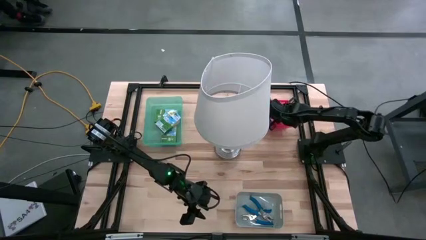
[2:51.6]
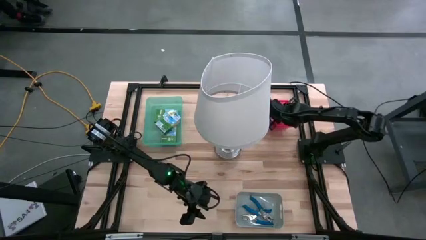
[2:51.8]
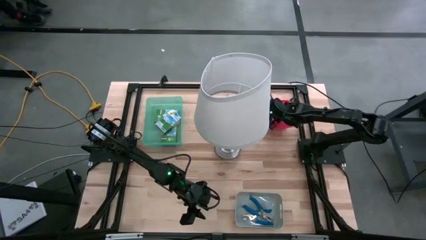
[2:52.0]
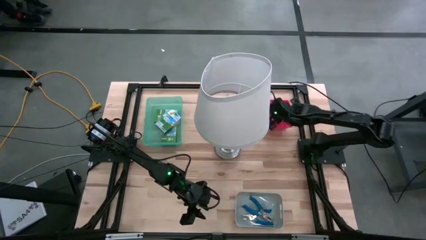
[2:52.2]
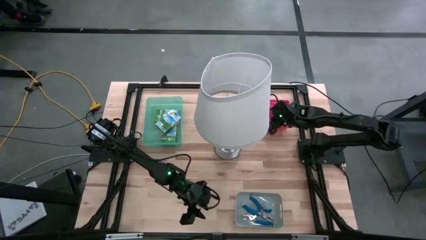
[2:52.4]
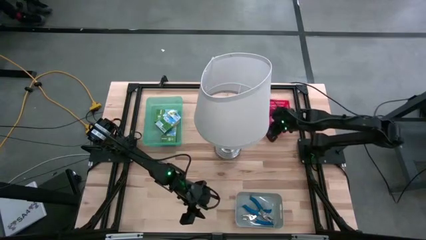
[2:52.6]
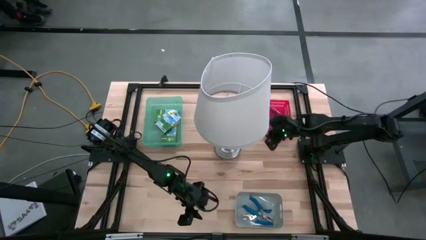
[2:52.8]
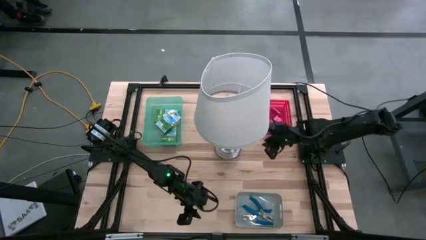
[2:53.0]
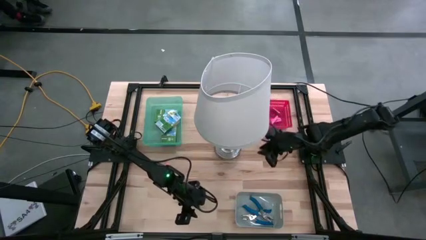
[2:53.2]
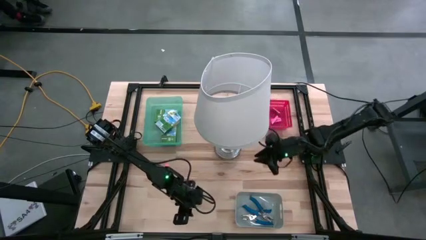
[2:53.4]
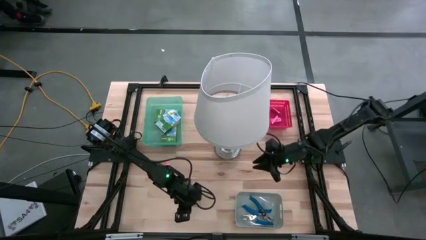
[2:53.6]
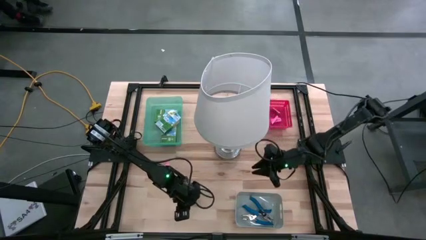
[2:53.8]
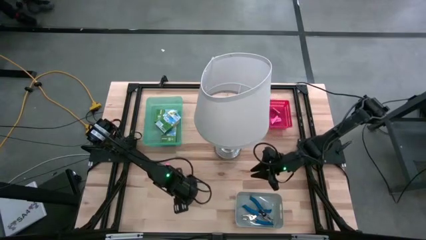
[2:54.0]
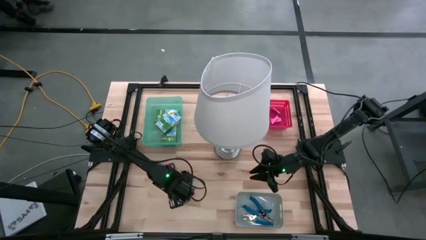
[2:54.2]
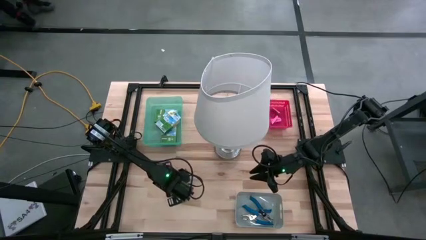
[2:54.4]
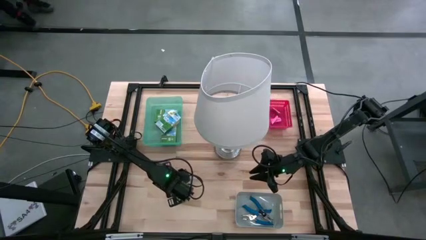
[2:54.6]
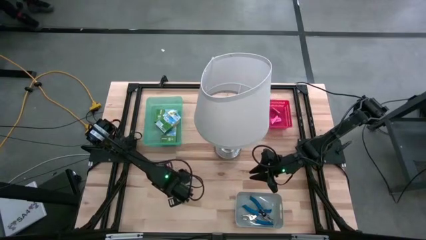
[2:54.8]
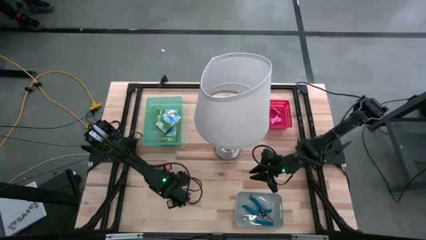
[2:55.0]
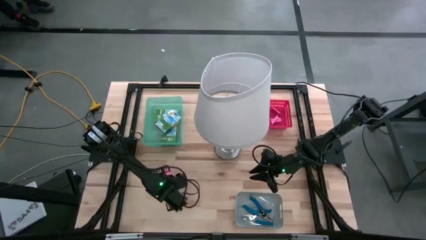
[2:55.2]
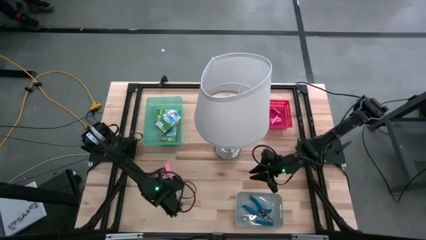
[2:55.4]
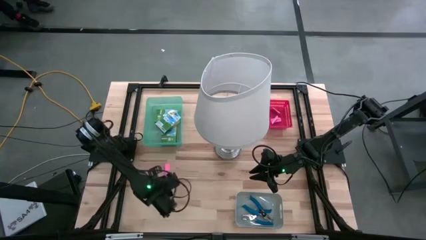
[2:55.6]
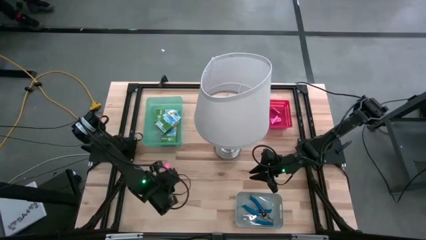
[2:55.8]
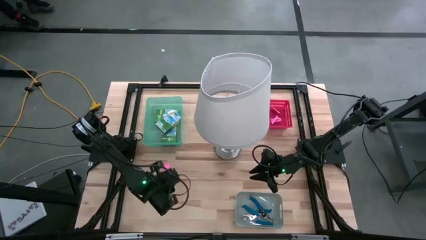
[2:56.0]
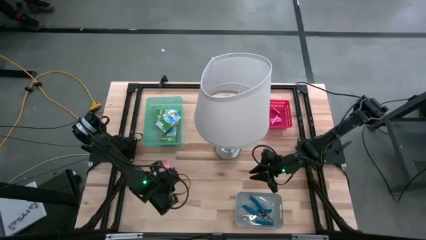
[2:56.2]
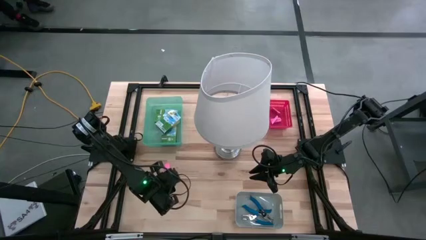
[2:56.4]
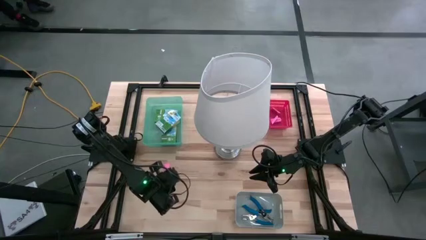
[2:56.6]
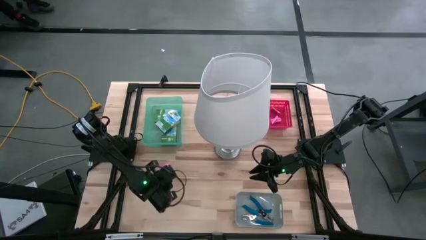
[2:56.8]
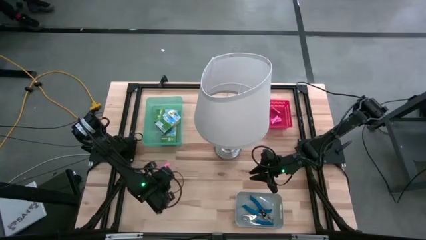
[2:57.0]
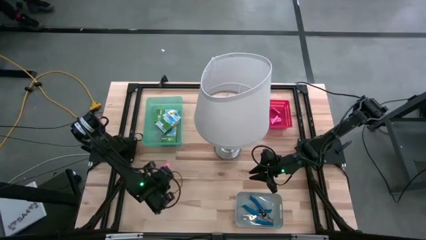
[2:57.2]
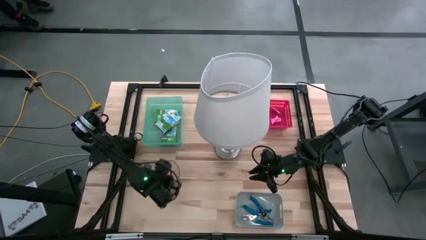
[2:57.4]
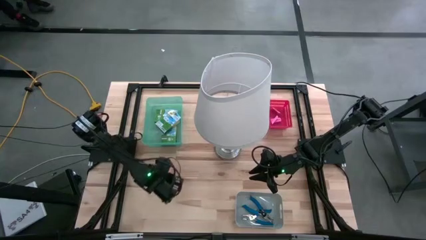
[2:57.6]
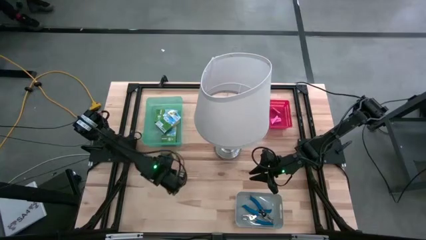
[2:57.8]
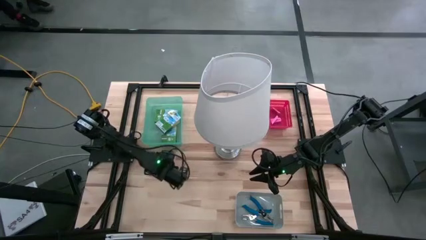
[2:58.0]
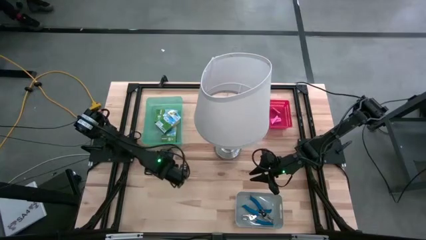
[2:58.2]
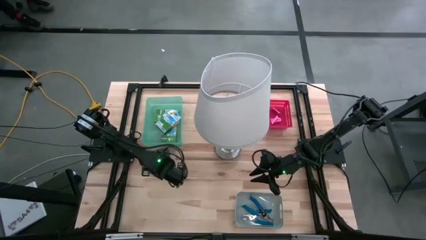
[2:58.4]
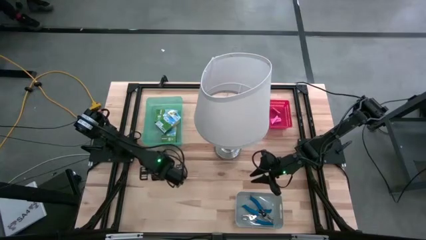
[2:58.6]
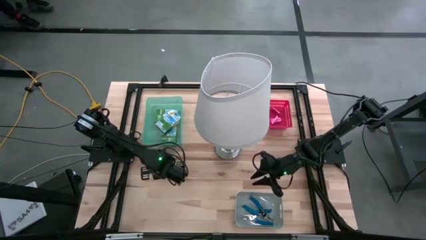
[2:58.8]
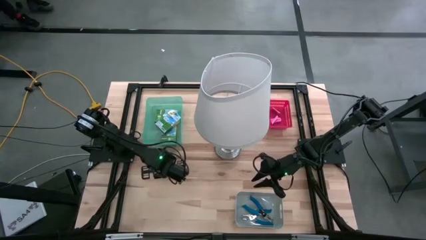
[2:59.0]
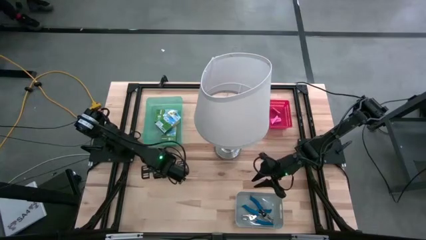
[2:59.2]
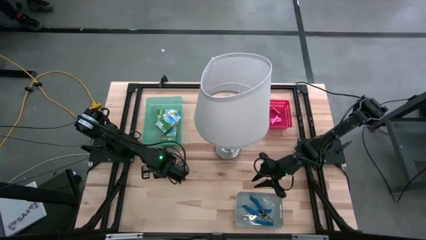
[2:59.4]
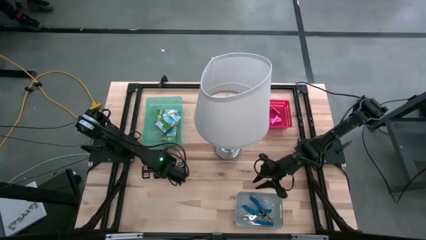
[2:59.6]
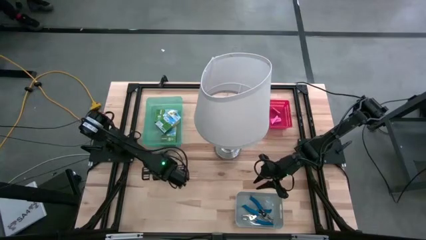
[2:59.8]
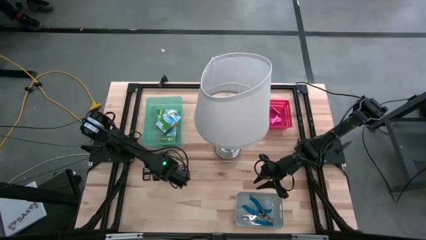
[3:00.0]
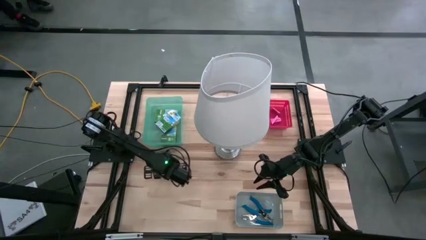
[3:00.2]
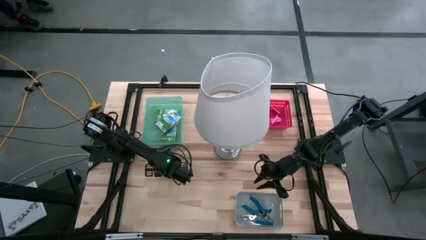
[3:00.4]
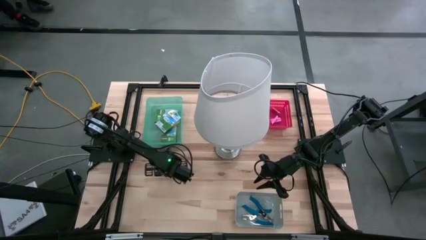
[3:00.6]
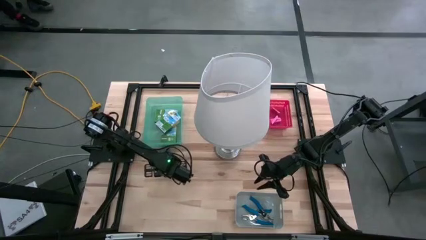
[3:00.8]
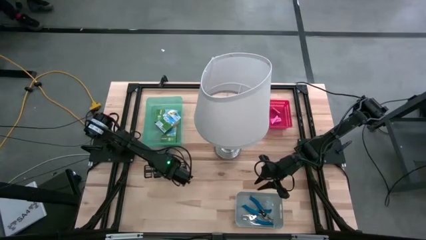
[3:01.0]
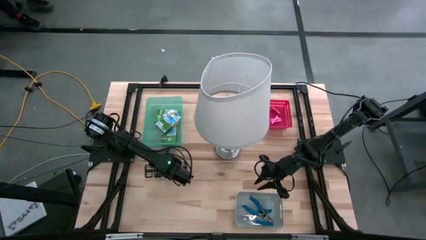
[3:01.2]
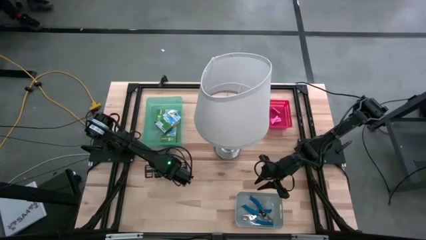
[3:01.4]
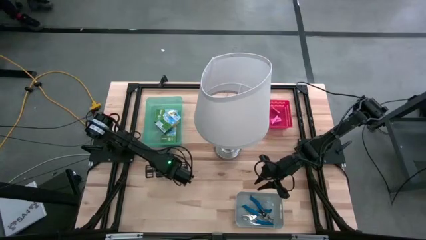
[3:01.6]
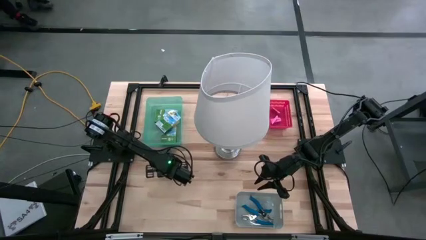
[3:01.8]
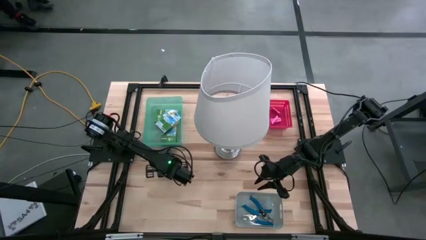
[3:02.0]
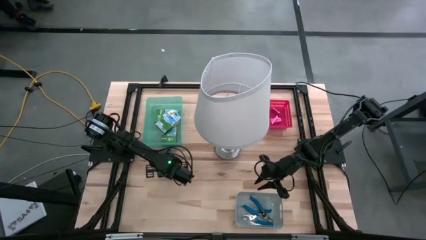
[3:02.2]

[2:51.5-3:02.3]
Task: Pick & Place School Supplies
Put the pink eraser into the red bin

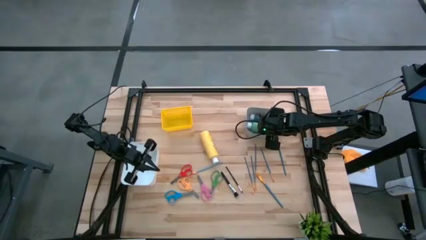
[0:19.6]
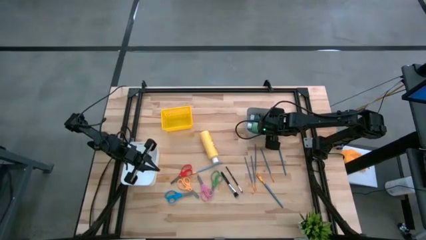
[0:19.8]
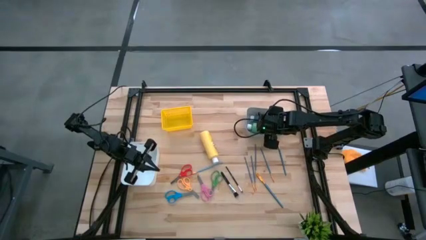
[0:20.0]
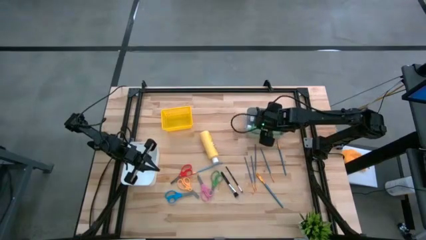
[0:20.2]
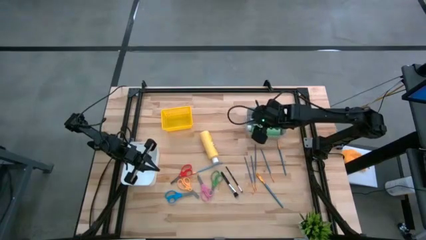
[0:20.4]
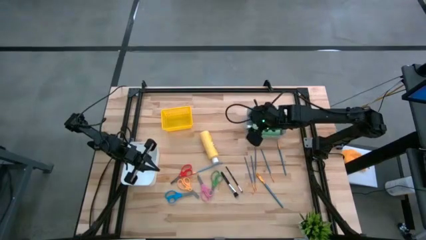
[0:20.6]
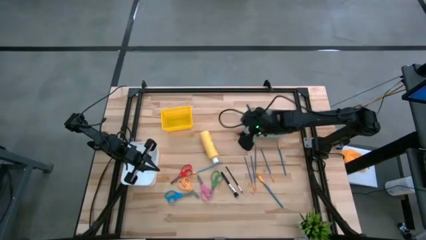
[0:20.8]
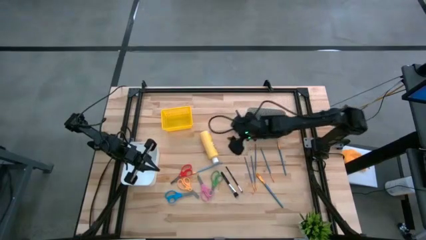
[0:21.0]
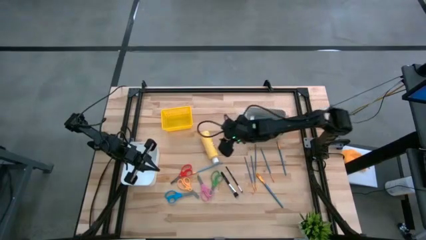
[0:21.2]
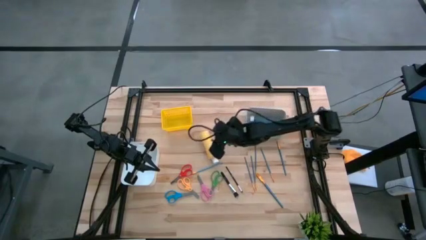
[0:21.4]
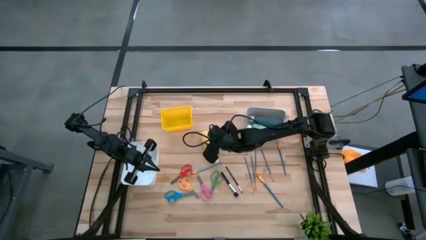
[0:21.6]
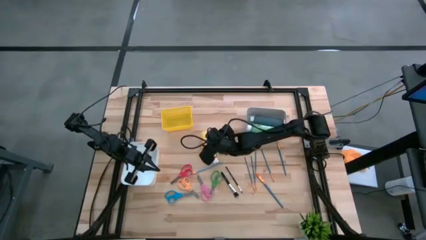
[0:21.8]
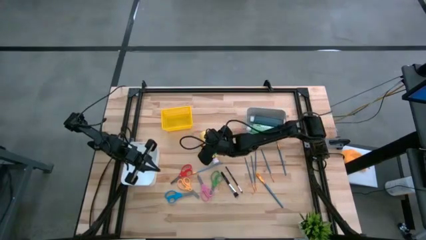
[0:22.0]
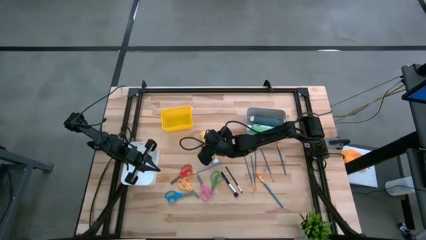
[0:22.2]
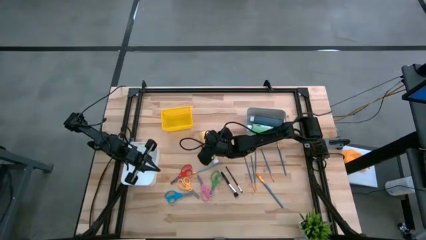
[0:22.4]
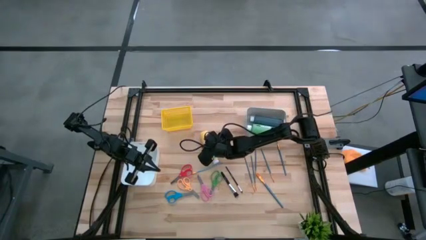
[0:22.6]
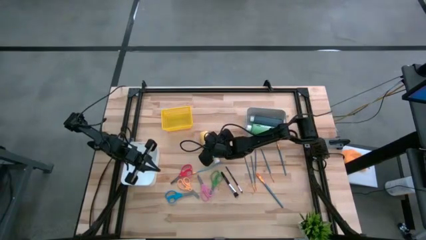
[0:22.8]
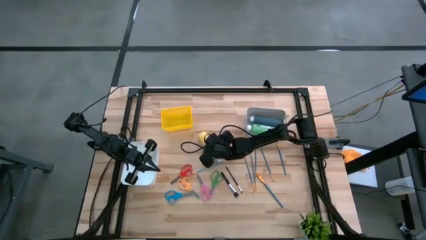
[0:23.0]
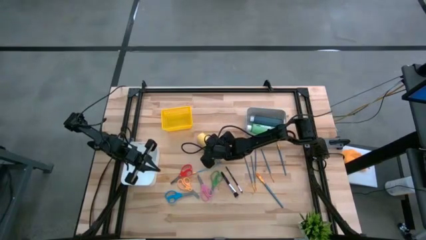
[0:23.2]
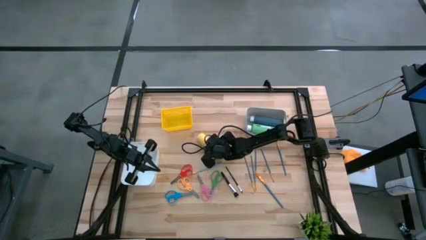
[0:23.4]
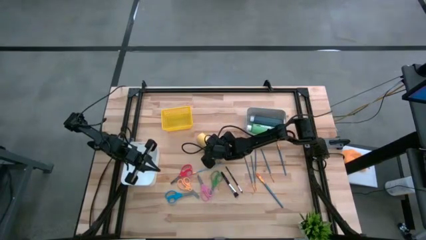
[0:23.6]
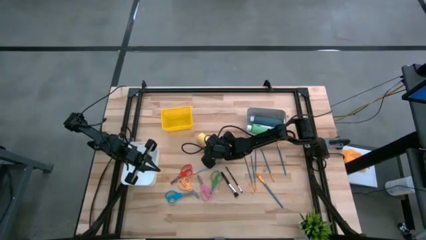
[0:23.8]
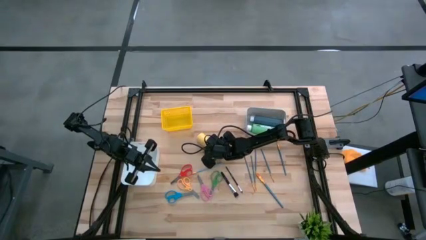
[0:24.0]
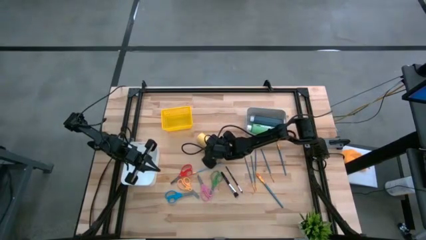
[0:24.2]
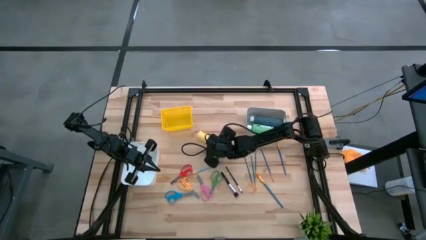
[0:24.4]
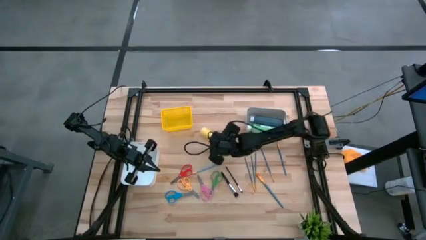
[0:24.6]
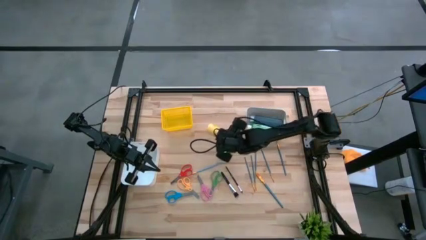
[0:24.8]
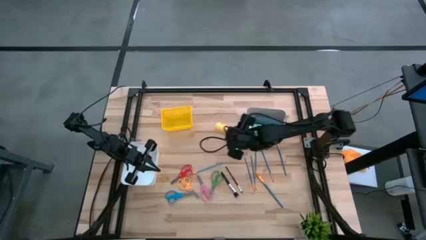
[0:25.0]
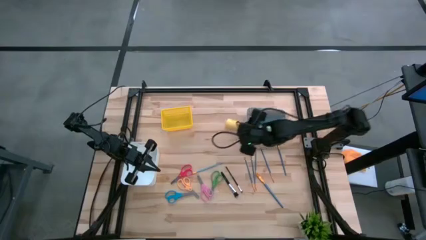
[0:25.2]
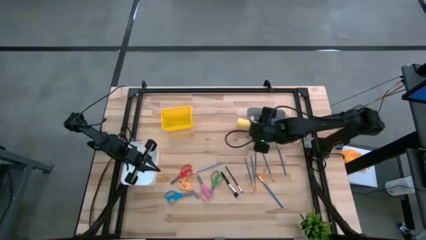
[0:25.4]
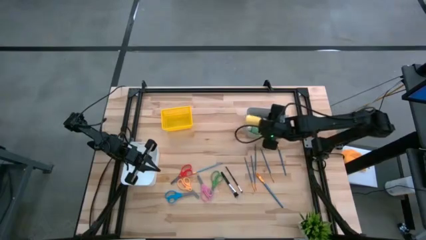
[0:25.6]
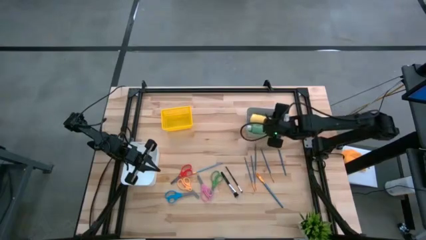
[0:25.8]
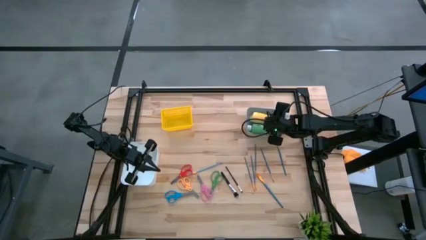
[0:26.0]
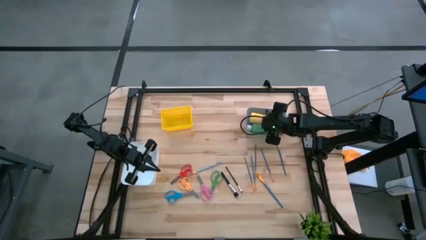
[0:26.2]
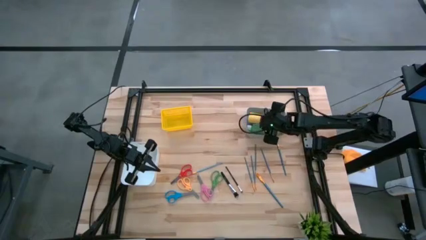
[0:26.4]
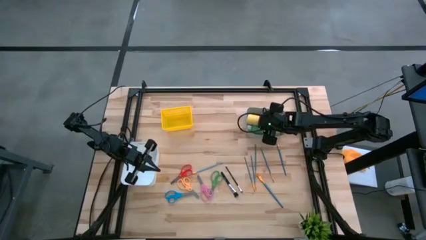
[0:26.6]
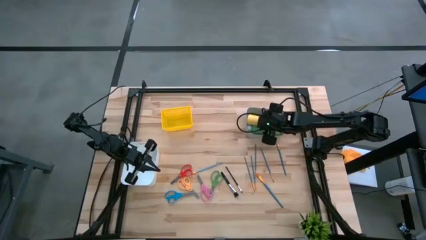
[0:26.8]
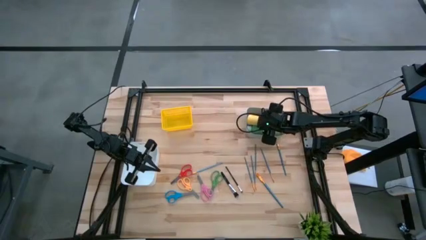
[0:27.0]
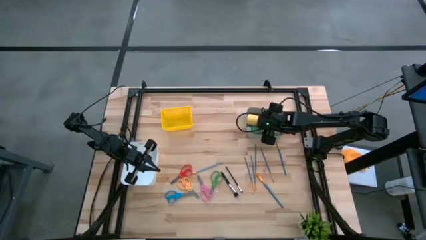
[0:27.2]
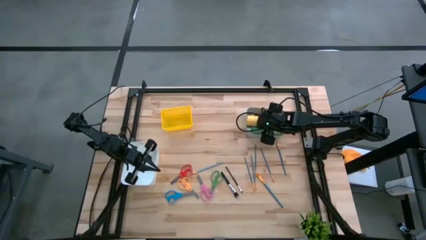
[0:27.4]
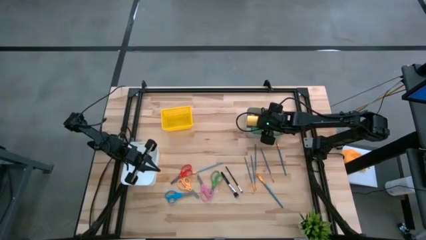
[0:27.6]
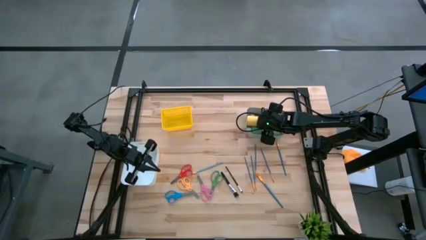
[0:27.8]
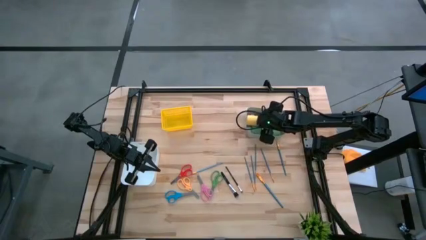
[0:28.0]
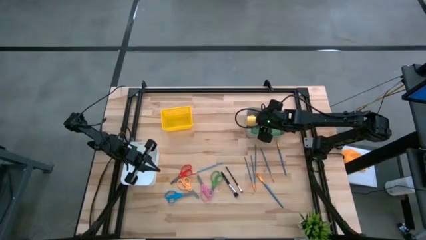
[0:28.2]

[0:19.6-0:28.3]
Task: Pick & Place Paint Supplies
Put the yellow acrylic paint bottle into the gray bin
